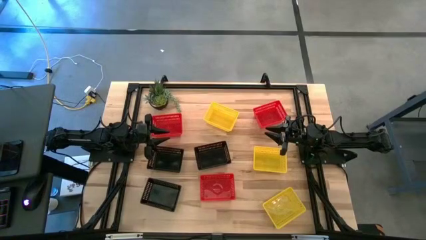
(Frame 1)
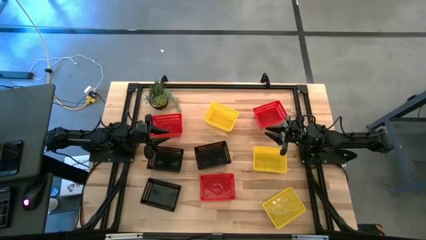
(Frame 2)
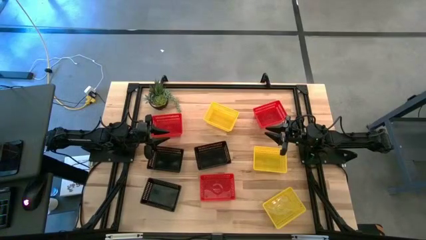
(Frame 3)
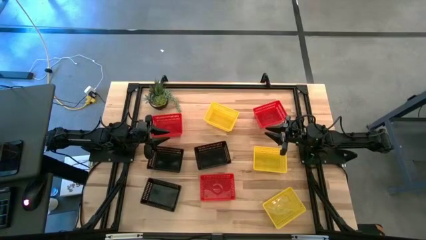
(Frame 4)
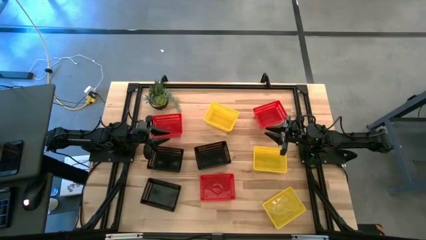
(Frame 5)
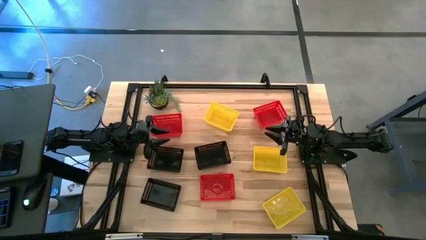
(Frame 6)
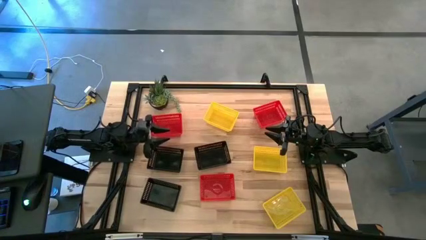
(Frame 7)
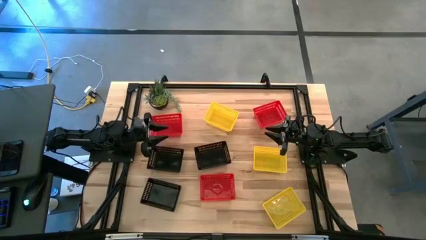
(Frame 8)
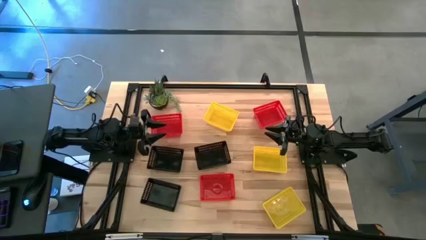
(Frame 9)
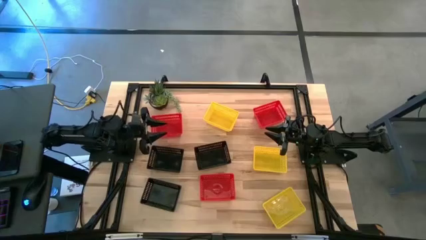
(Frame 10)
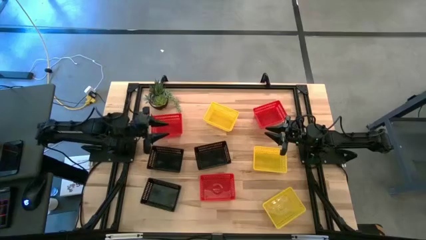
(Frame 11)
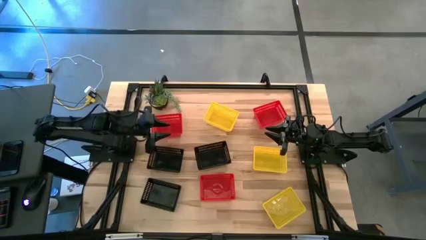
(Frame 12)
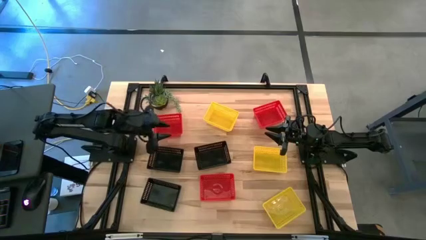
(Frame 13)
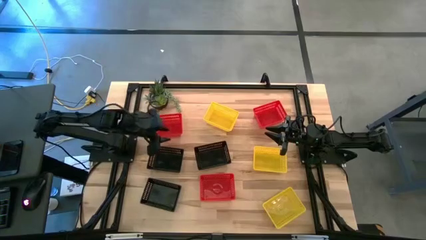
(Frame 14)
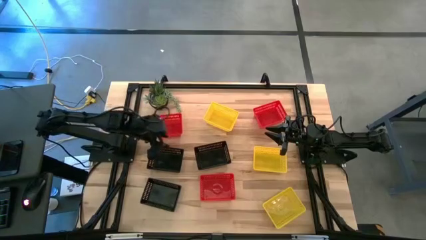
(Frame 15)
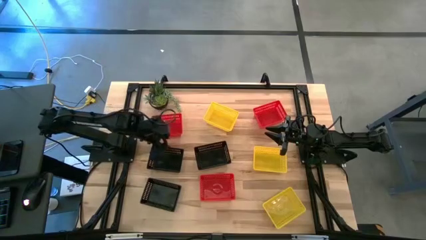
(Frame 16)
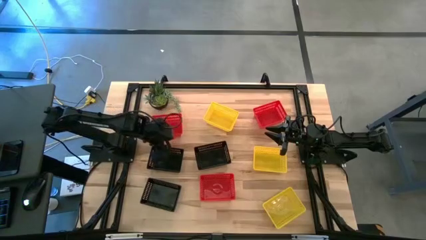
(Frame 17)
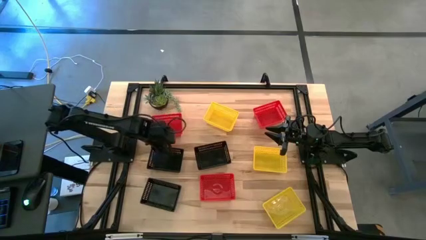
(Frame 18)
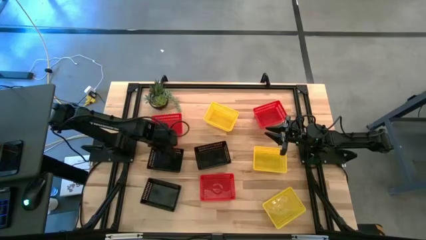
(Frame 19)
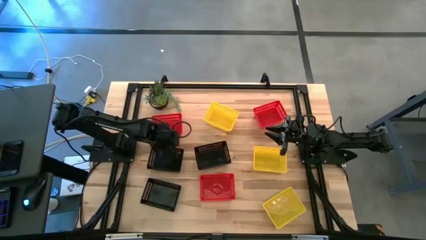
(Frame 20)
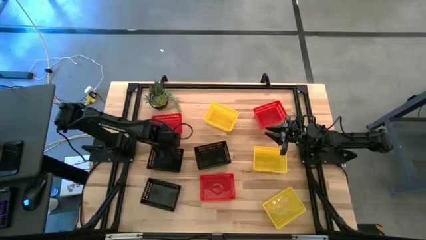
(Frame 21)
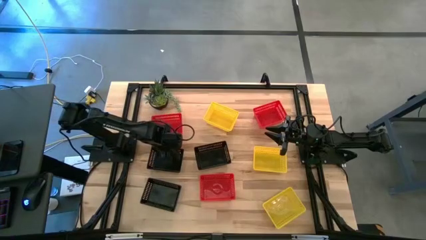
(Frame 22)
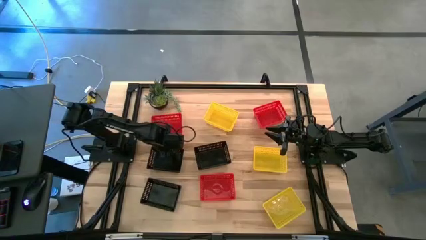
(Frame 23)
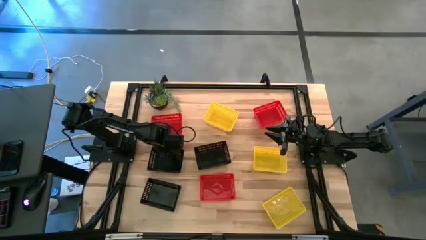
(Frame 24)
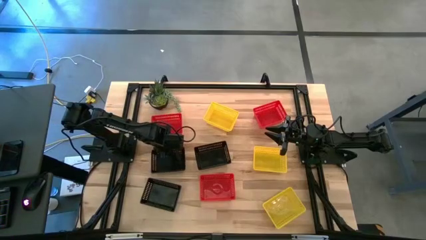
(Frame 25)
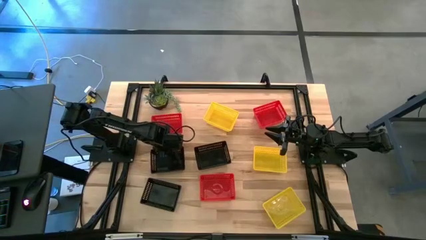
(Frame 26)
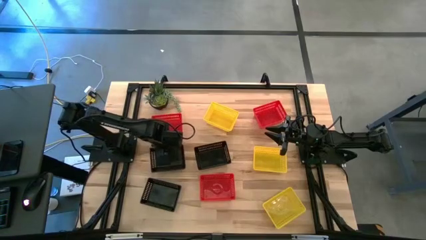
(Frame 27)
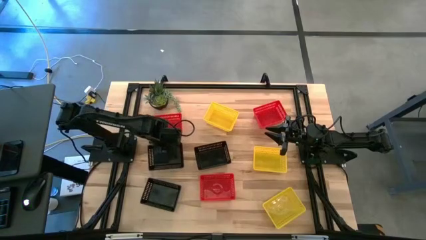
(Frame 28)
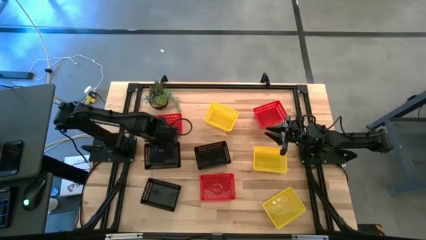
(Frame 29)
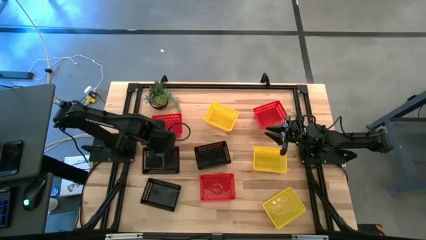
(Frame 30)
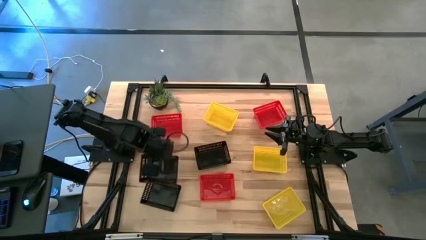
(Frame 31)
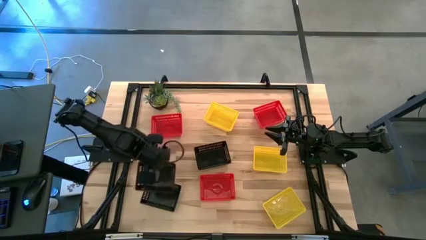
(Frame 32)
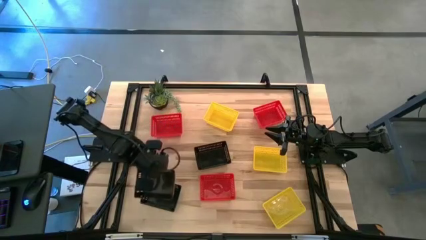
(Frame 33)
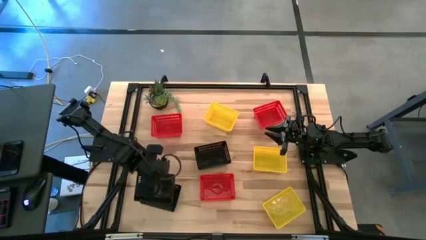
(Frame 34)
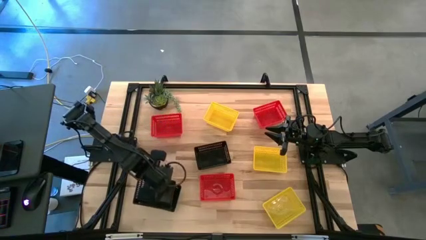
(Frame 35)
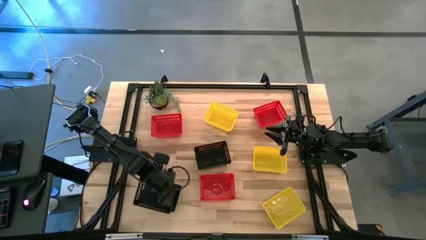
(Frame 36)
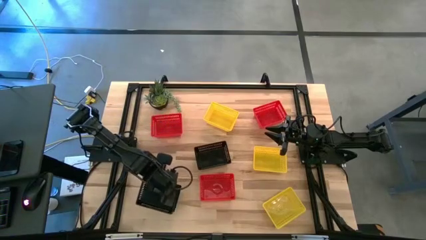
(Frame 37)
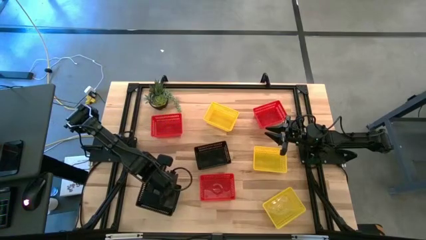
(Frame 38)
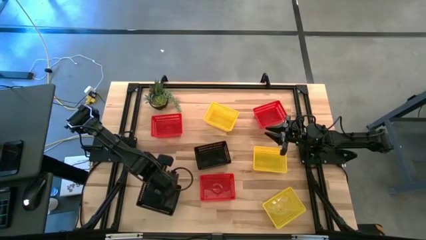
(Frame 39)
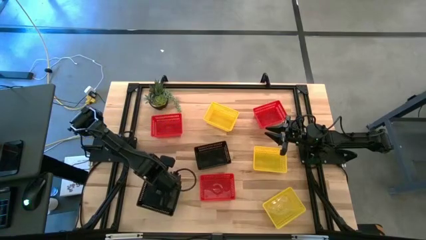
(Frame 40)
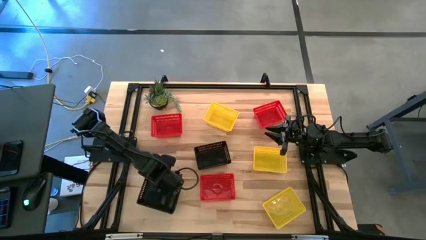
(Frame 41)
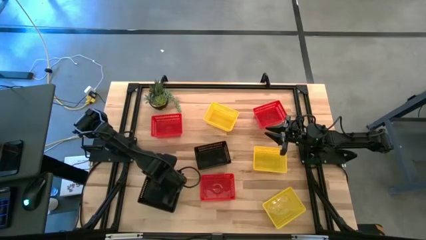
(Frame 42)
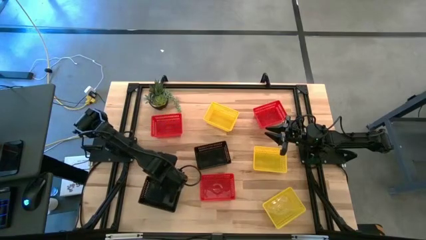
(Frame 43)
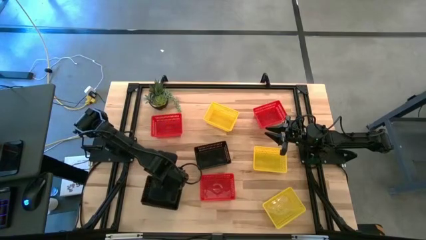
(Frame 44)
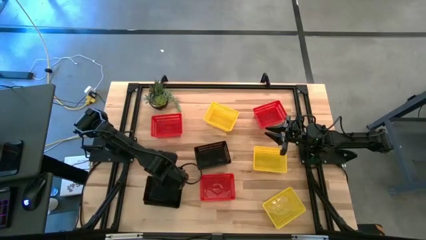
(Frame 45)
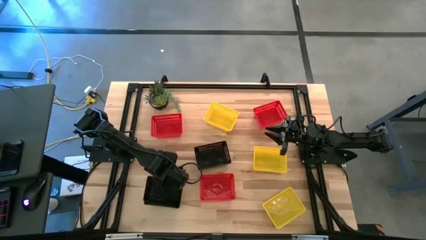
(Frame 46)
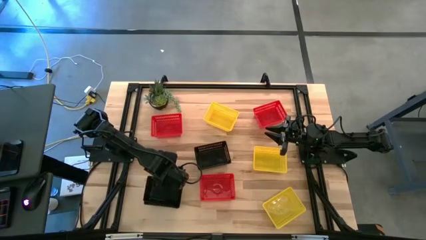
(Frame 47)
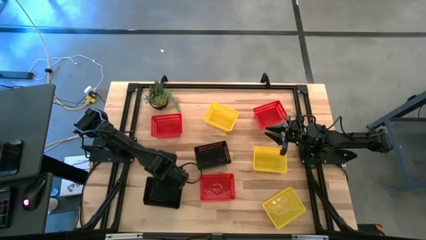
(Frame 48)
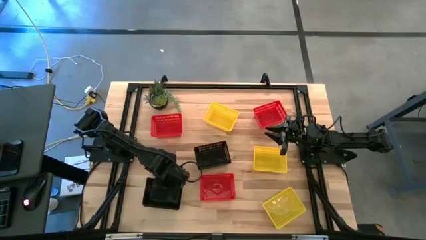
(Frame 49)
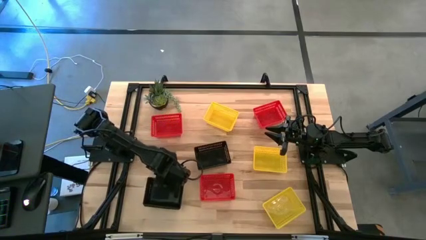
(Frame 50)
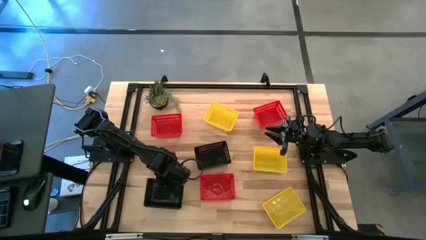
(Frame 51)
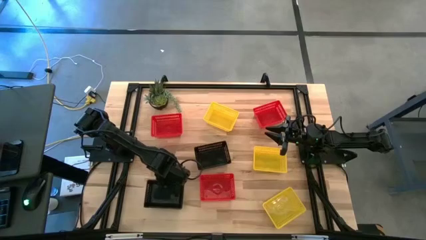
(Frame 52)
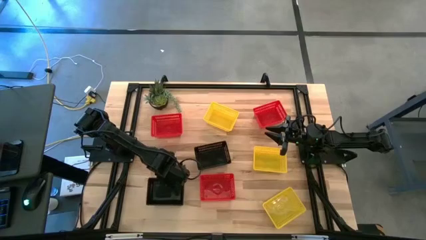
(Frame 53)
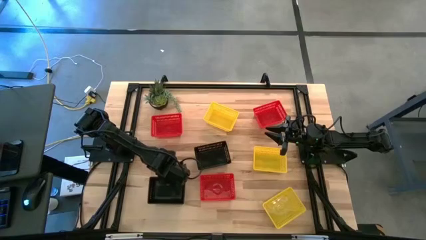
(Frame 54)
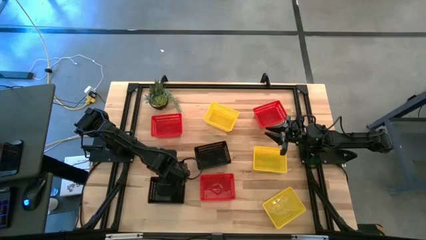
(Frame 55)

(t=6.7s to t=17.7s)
Stack the top left black bin on top of the bottom black bin
